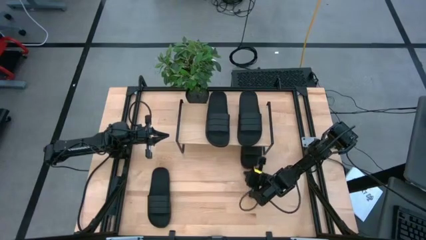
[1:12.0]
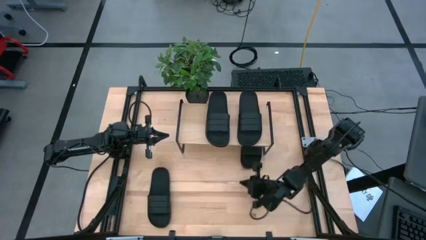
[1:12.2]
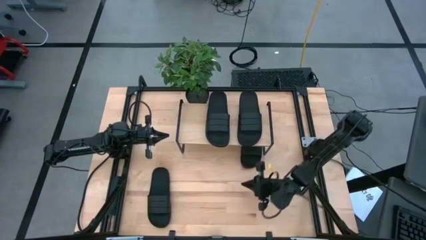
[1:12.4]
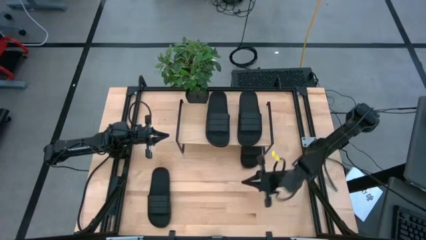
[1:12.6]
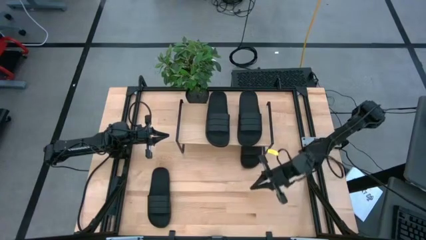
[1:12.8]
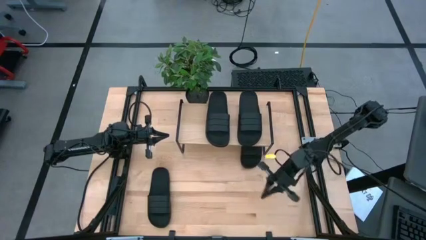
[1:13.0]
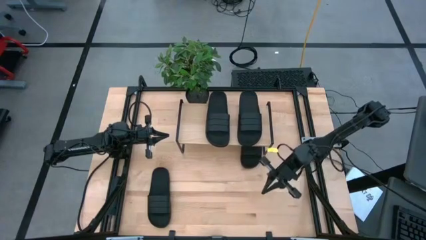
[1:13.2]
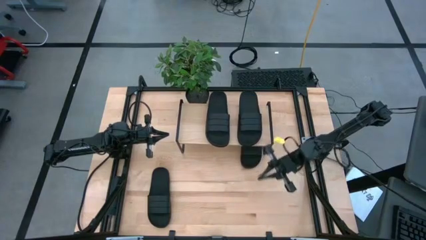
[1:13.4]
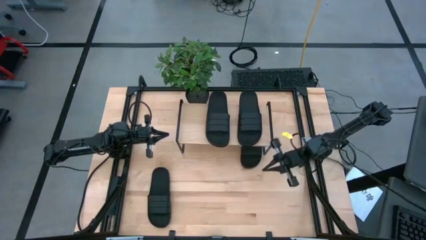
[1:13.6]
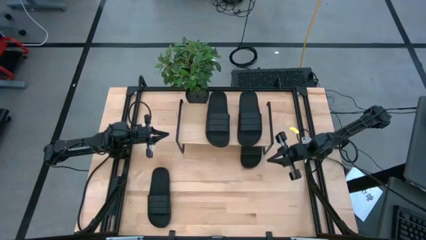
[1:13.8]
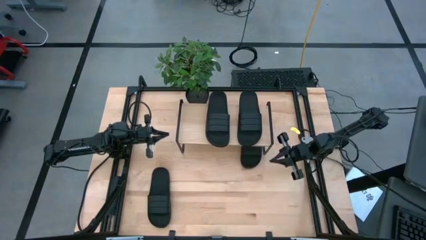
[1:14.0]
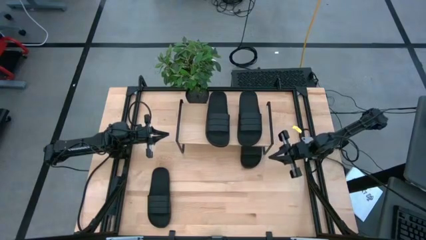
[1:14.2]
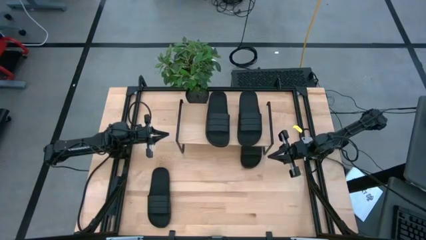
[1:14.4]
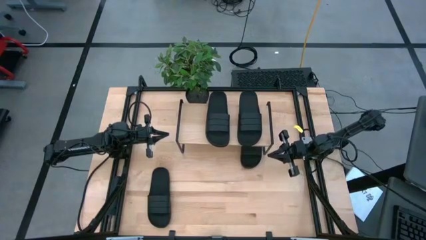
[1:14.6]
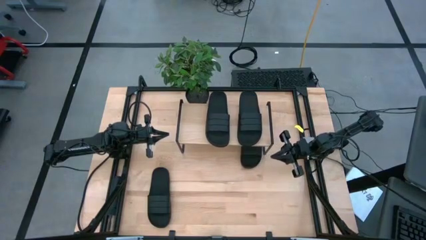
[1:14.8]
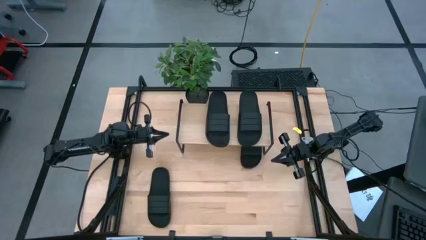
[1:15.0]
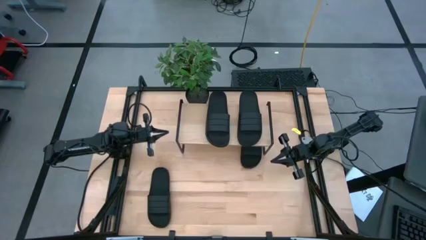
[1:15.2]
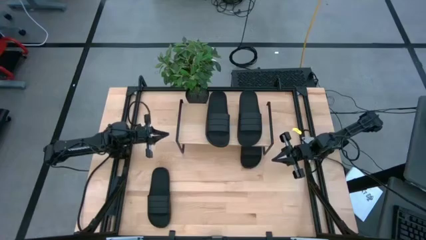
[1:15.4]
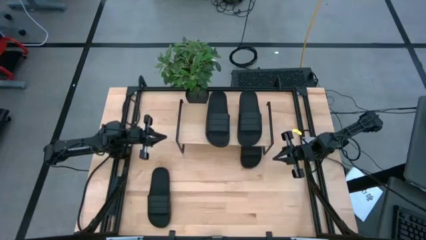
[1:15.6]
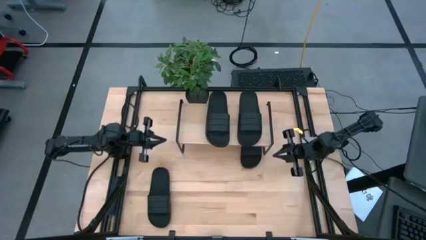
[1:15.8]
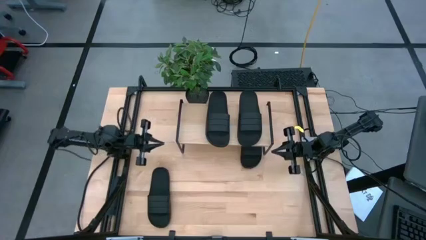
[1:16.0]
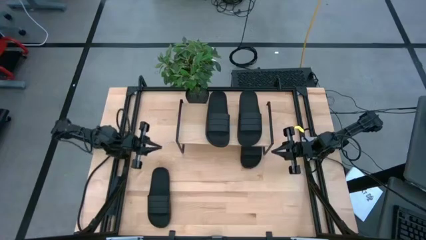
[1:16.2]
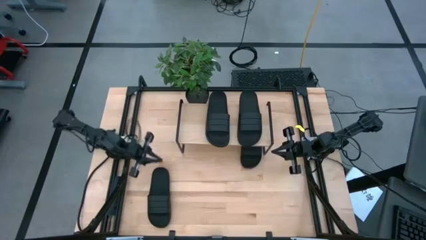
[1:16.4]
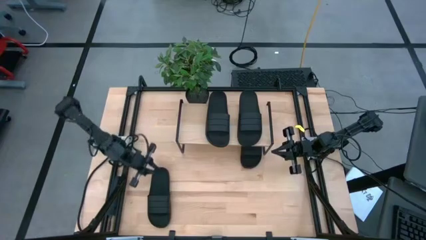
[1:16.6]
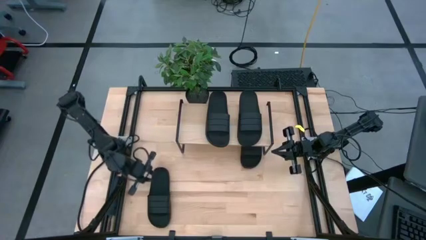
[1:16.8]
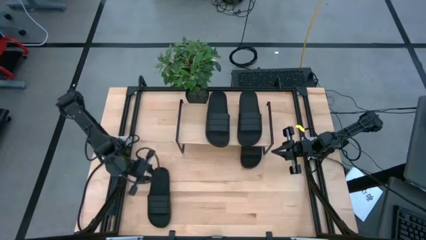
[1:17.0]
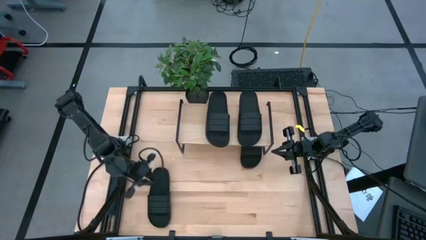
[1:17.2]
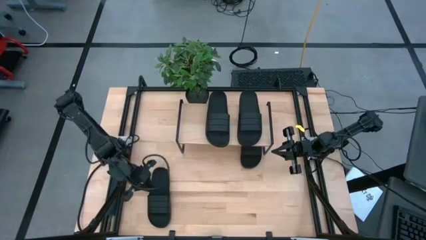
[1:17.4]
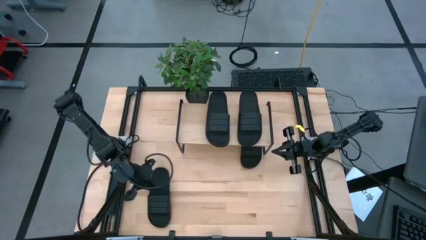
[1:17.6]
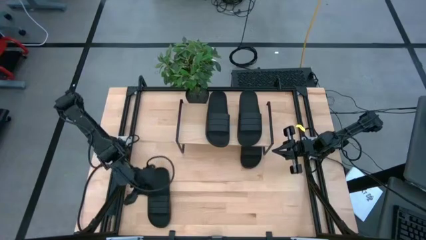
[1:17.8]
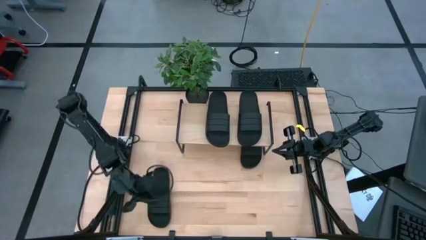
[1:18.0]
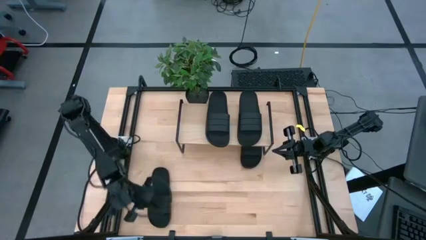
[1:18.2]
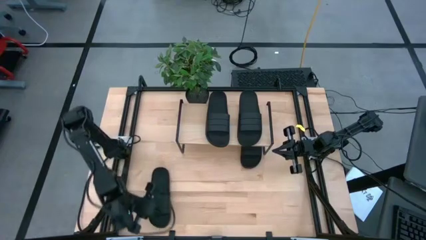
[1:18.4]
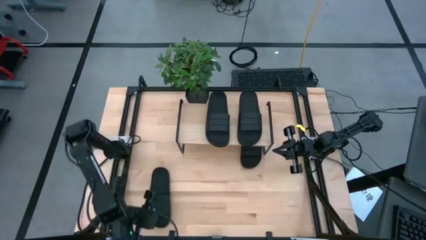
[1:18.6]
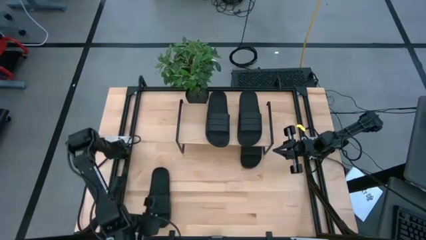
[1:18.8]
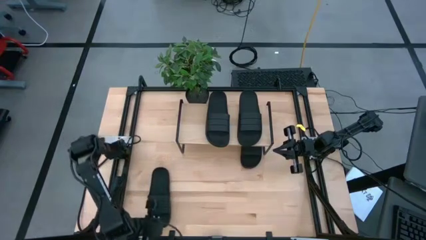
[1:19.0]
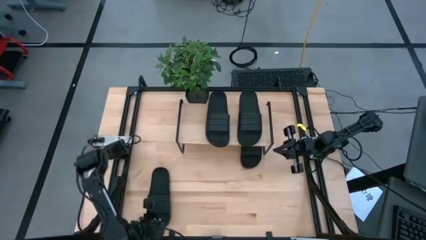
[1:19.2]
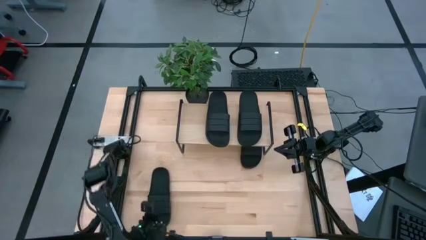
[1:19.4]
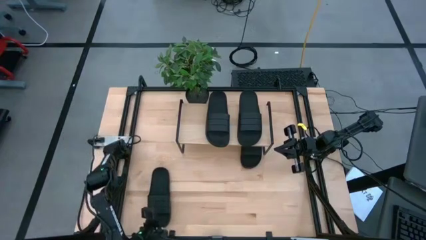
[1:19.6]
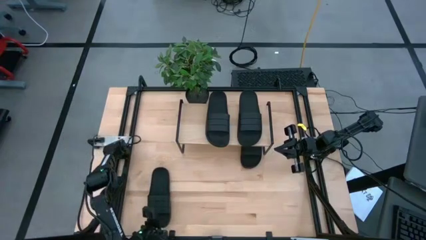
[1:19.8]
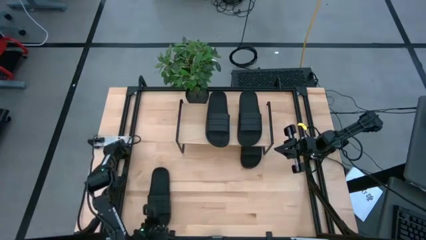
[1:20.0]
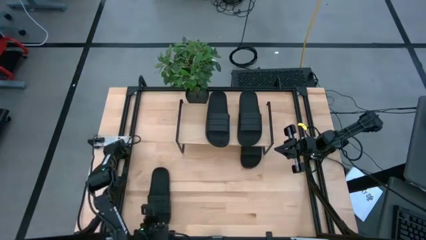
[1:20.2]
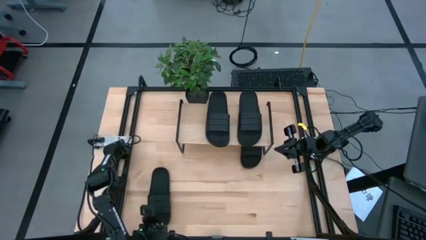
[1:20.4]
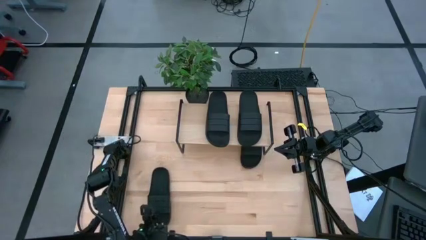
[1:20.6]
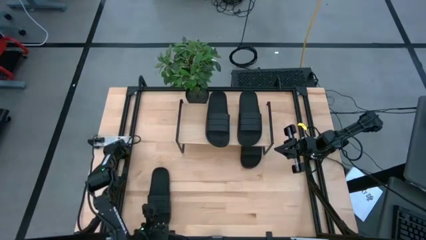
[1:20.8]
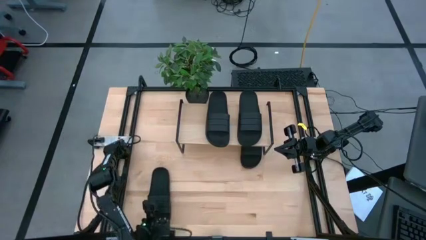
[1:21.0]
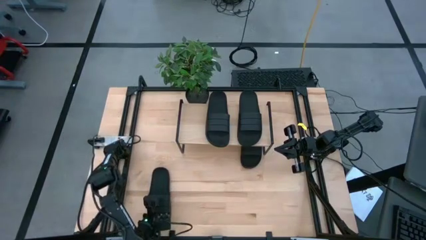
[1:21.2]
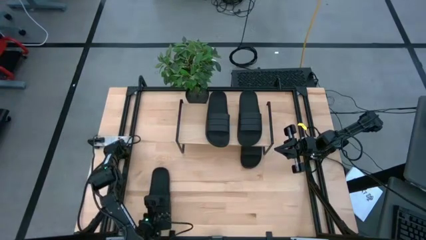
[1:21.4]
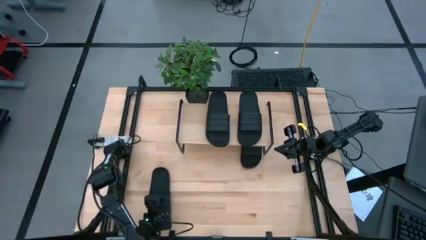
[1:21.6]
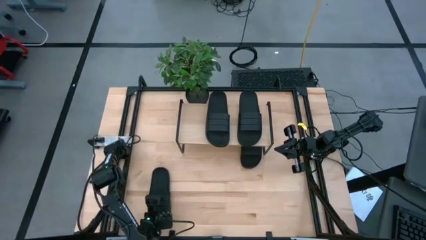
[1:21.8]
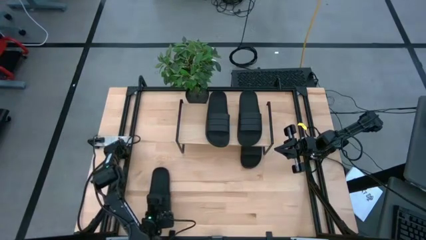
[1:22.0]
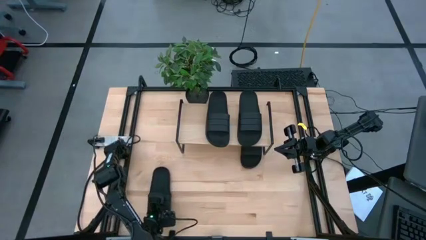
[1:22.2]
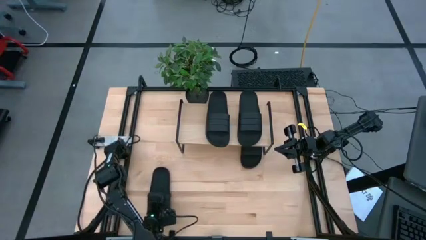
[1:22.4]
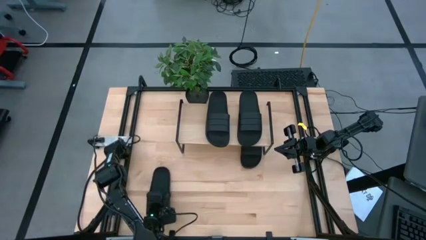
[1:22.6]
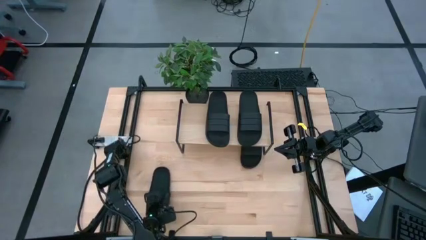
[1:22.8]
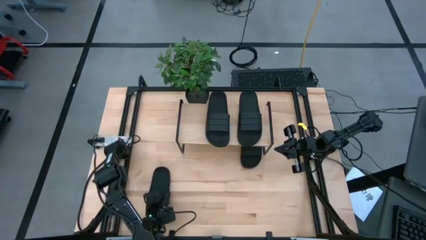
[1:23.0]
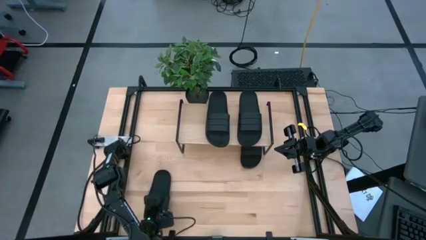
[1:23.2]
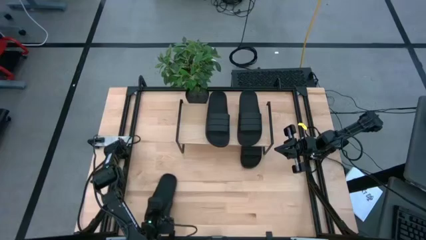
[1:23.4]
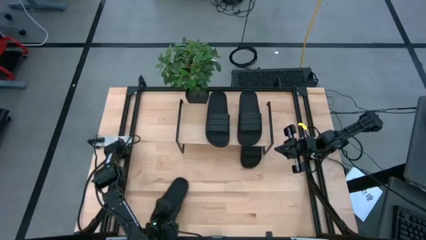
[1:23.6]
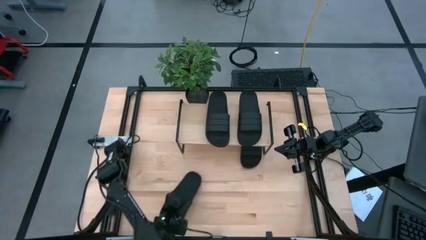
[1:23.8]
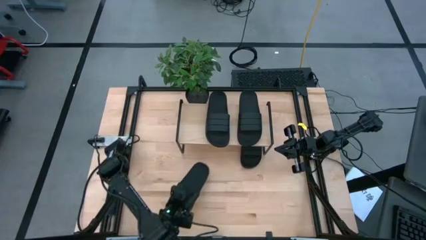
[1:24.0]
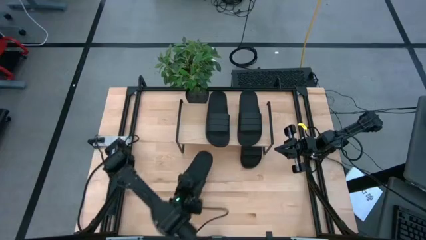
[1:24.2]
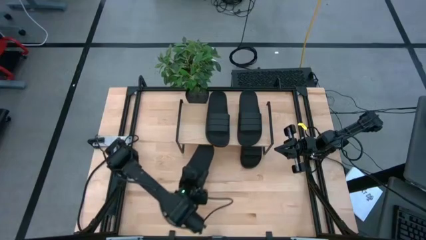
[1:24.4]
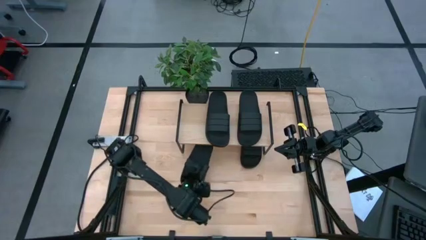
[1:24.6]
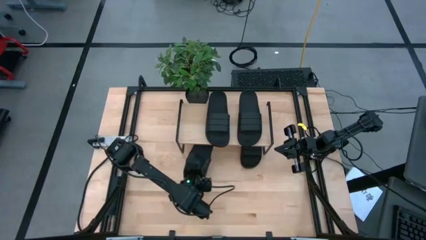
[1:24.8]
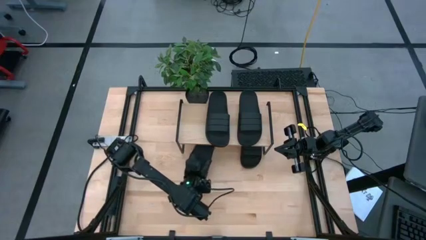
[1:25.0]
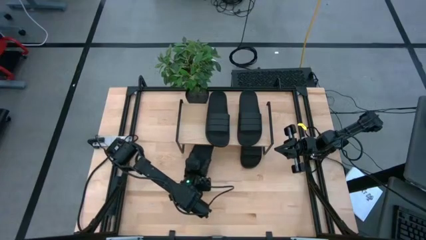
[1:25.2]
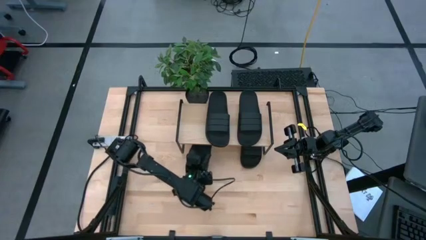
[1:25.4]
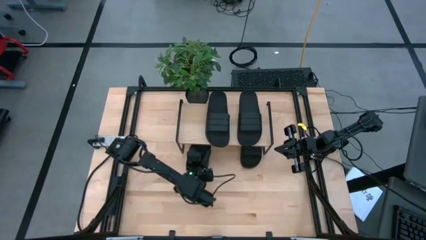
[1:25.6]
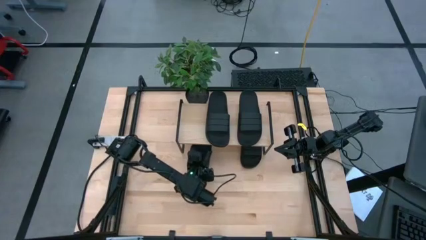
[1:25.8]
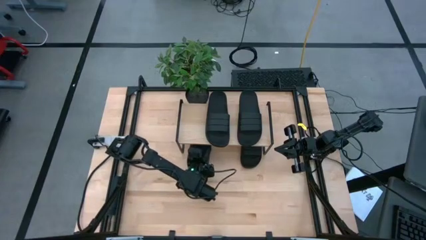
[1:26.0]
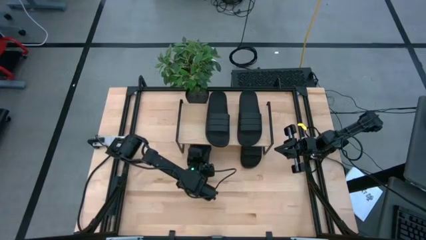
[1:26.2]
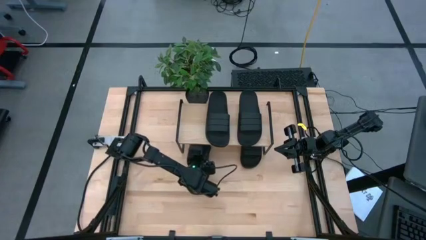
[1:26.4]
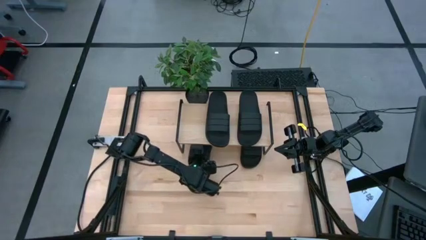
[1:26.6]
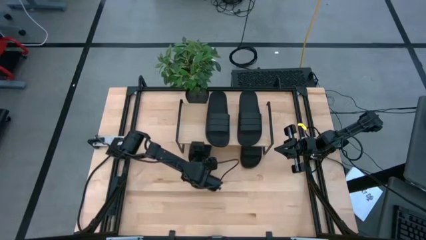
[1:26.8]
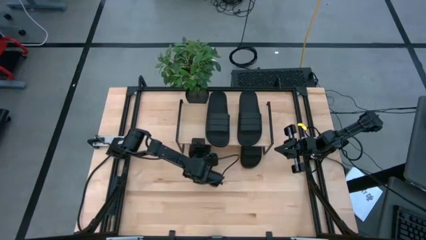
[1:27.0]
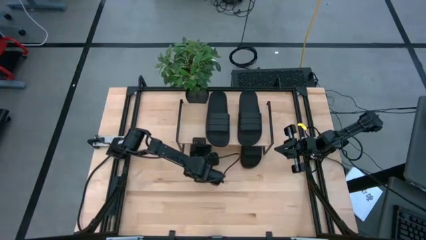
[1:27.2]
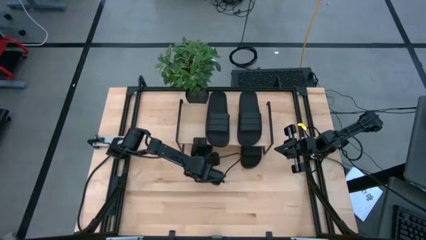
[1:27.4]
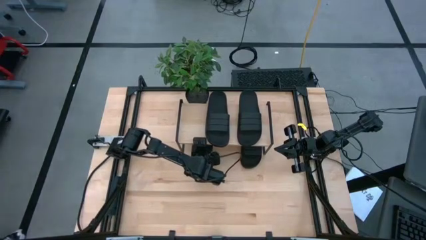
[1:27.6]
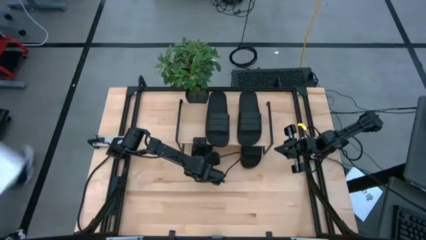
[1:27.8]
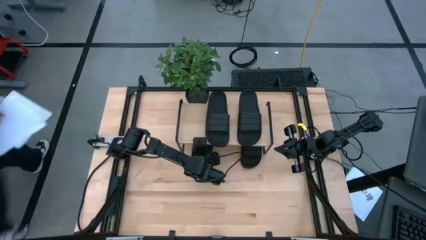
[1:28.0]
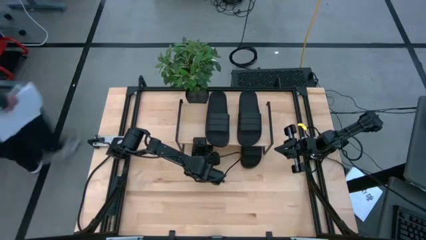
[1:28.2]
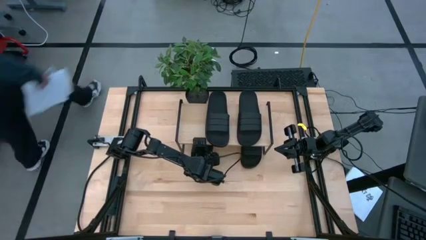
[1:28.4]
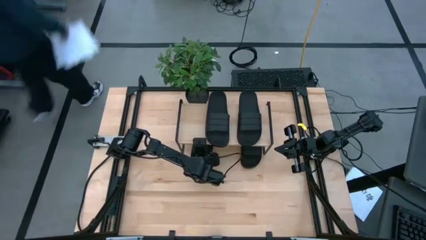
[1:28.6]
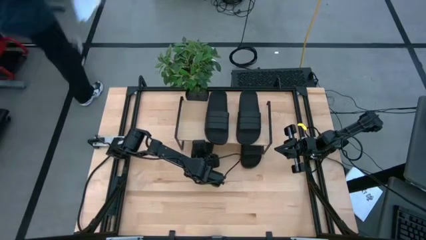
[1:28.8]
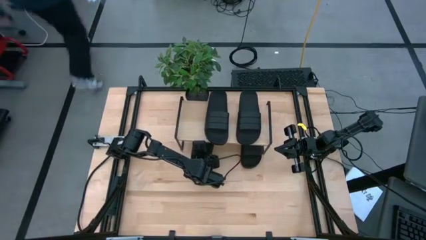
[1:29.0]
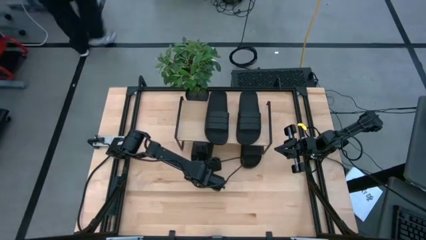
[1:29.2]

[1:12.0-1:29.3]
Task: Pick and place slides into the shelf
Put the black slide under the shelf
